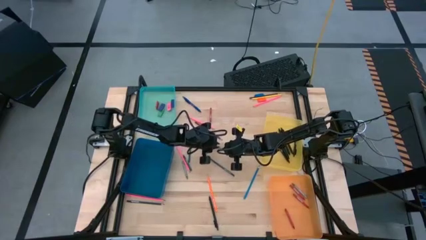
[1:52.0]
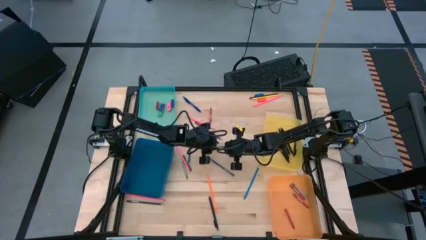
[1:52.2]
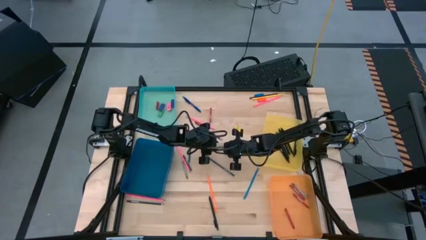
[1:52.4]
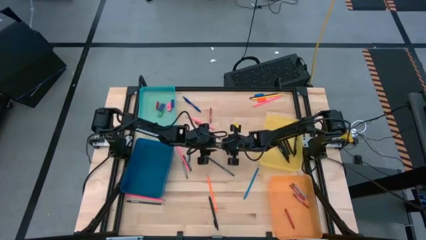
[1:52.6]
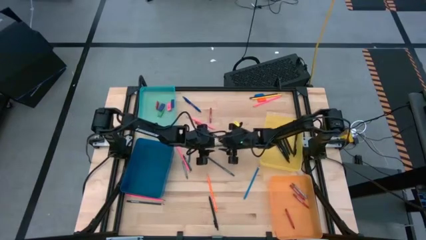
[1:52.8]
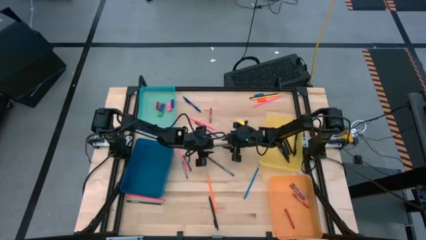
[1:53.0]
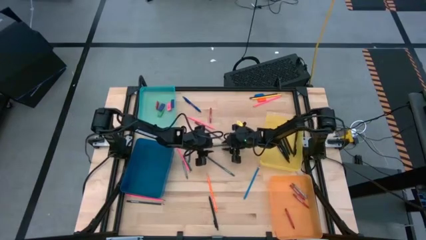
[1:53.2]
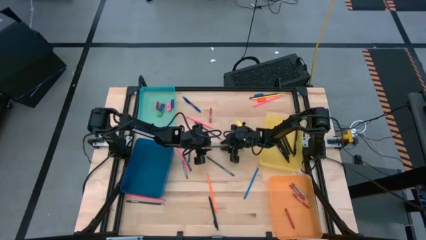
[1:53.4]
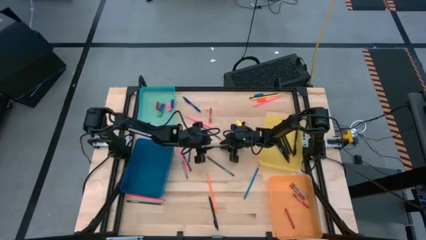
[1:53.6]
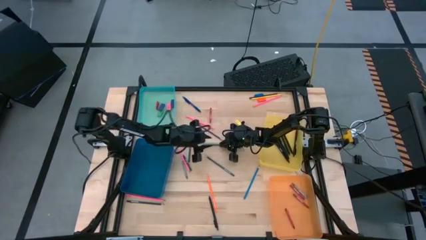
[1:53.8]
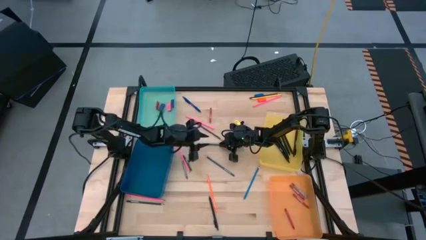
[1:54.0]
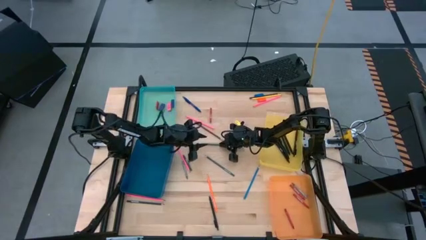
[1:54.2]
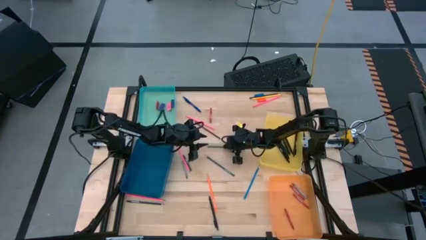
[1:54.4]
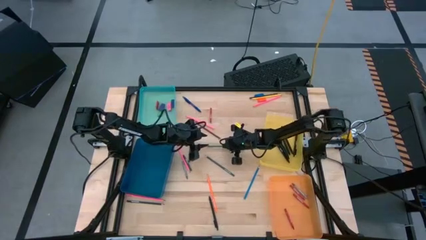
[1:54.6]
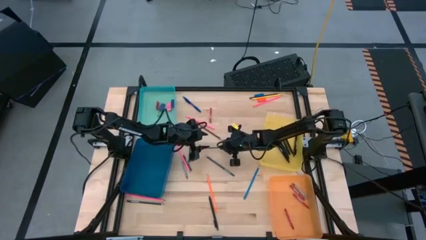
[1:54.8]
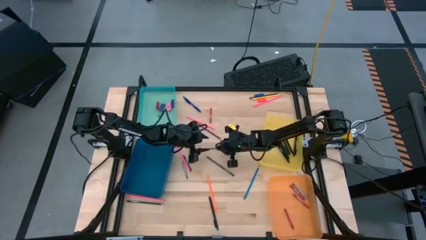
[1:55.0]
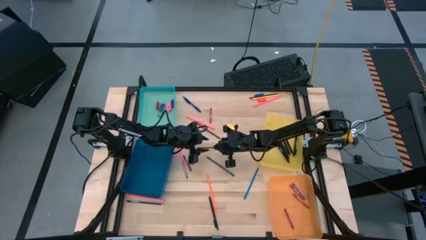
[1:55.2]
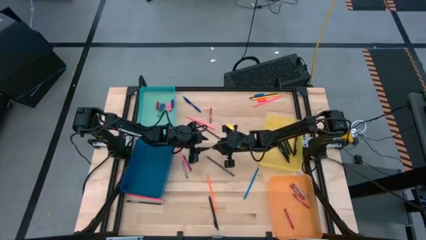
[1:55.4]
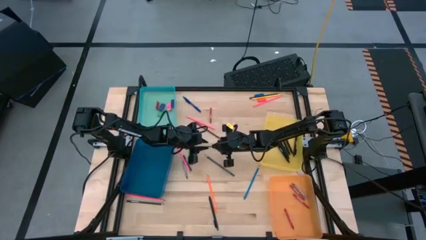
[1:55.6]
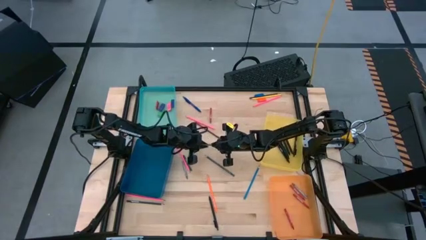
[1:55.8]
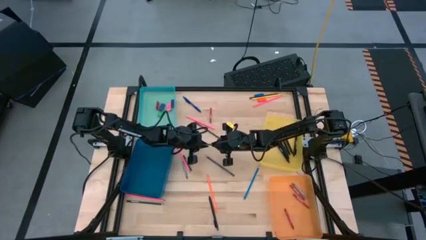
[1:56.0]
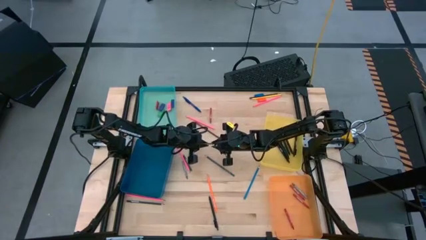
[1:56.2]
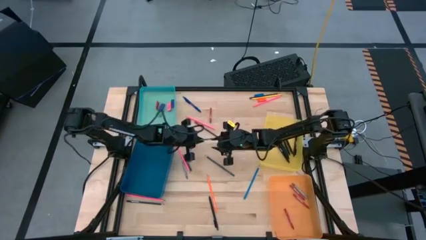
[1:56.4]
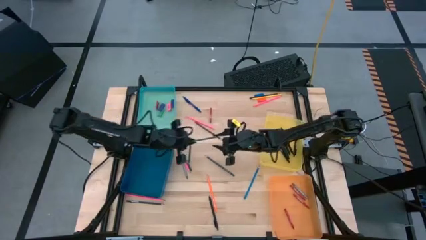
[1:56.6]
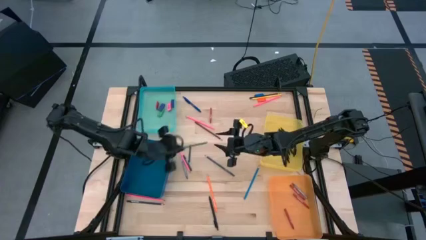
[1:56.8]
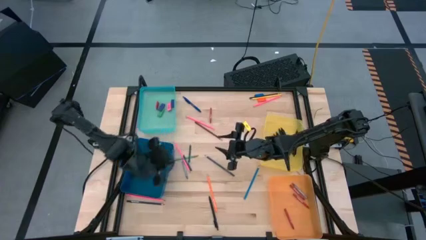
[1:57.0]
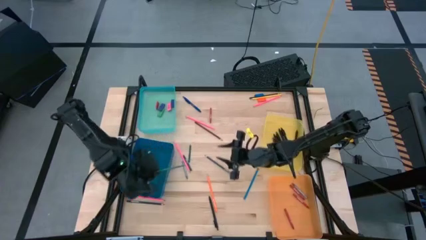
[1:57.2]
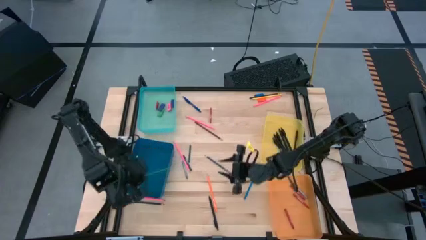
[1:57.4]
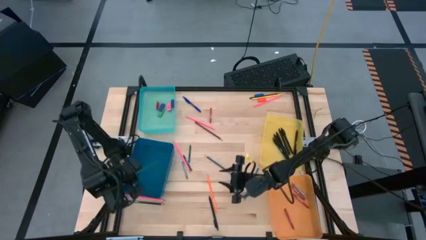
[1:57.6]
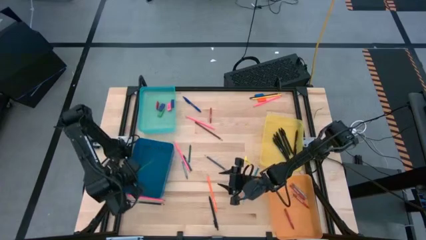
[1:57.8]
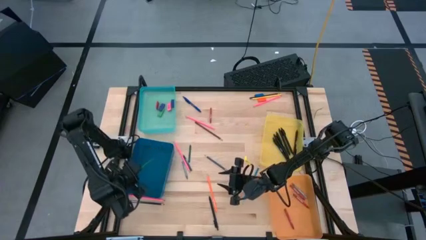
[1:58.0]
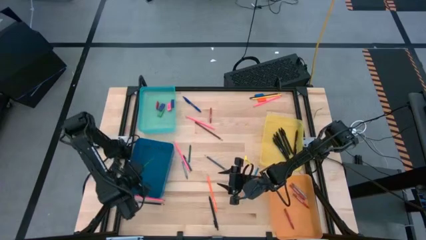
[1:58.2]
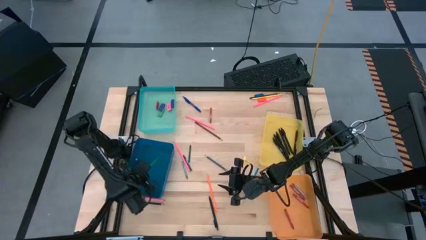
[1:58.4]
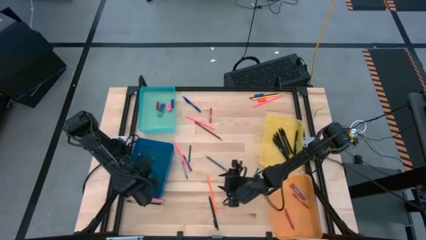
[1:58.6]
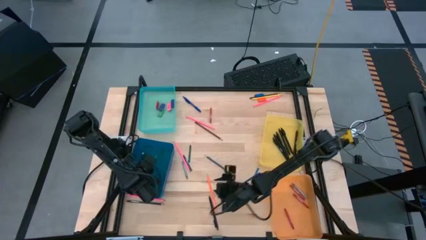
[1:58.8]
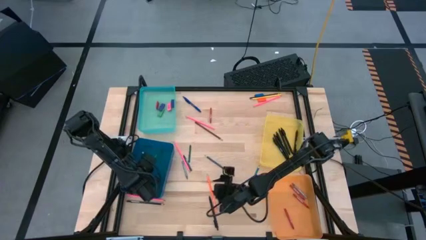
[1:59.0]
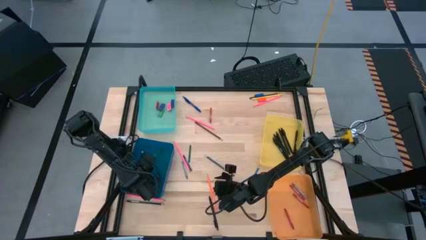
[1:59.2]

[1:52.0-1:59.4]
Task: Sort crayons/erasers/pens/pencils in bins
Put the green colored pencil into the blue bin

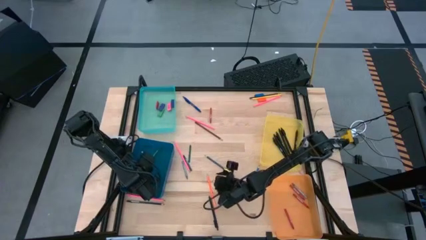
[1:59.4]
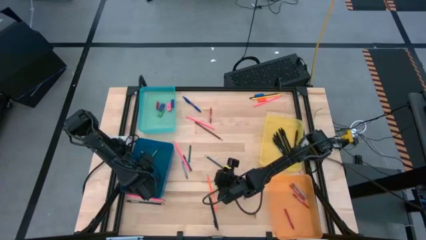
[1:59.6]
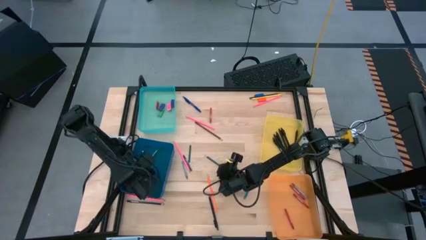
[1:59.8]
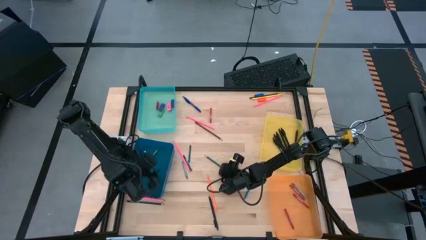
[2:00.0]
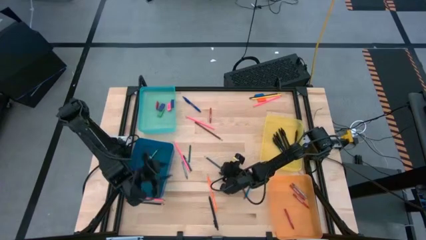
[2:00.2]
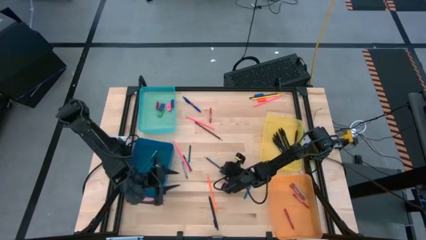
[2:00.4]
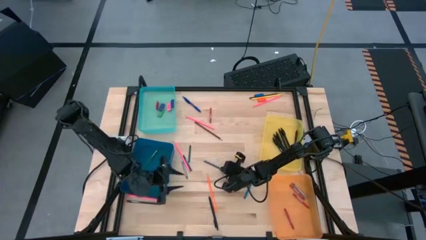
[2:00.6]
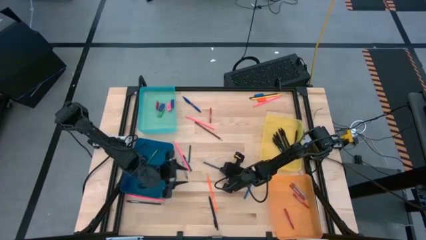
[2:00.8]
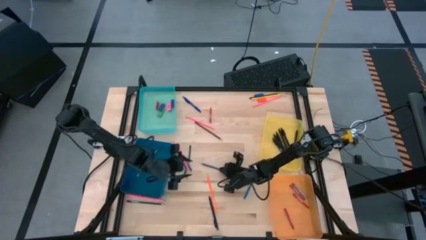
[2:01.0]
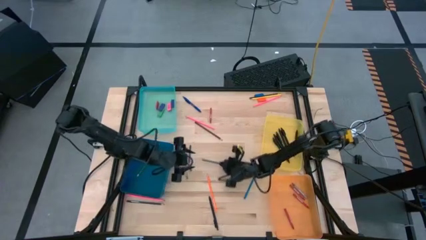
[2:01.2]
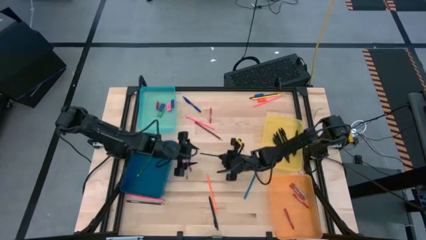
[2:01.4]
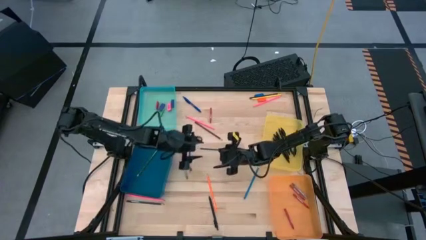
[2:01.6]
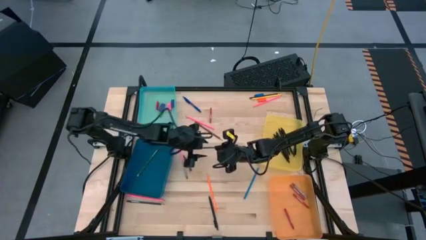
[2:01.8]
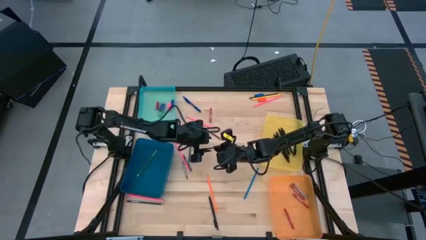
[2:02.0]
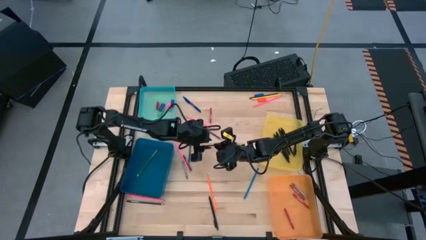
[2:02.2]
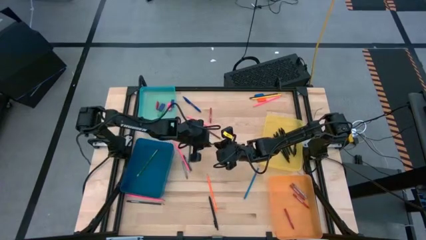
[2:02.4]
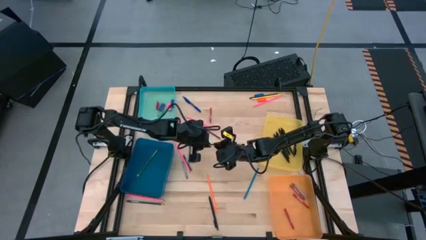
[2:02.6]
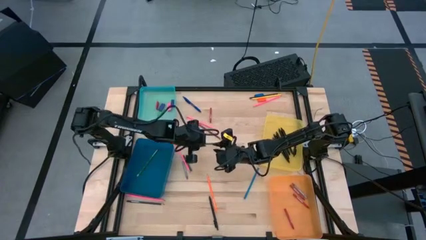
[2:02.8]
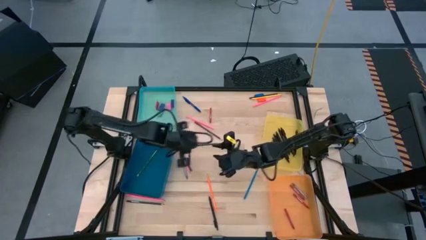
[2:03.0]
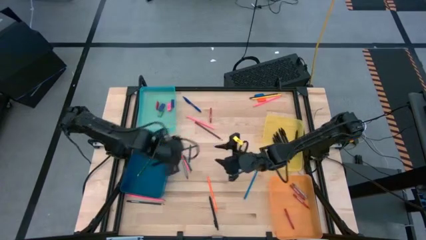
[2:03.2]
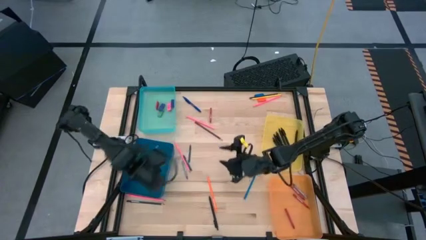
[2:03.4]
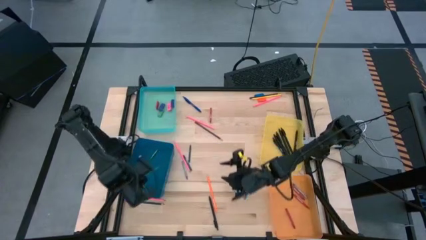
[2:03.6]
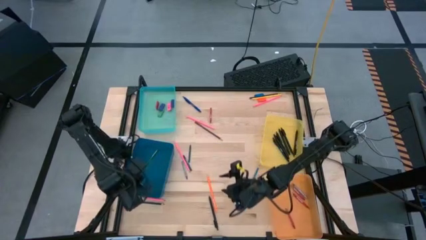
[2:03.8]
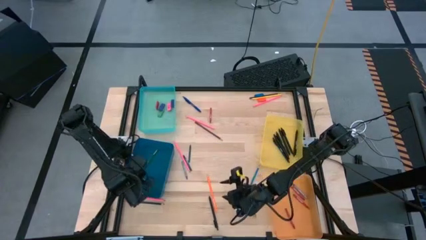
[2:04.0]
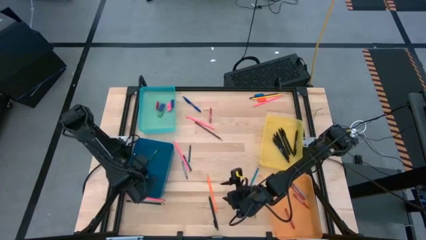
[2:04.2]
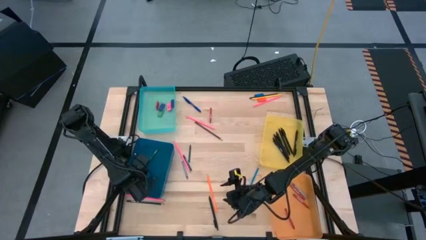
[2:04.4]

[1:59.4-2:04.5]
Put the dark green colored pencil into the blue bin

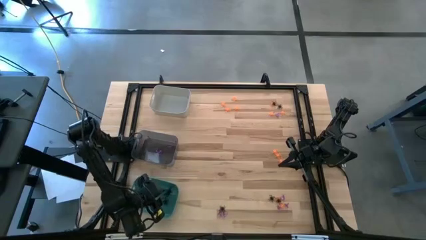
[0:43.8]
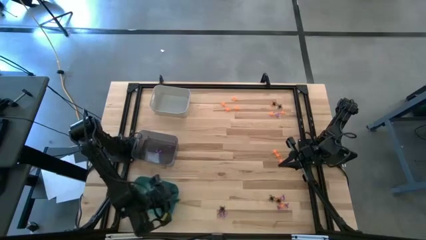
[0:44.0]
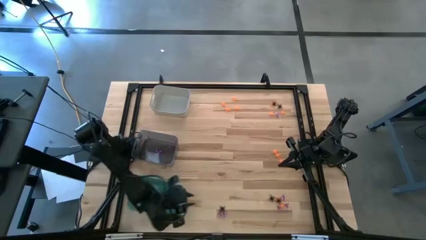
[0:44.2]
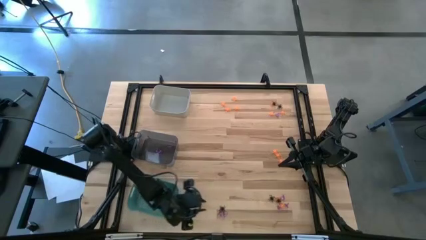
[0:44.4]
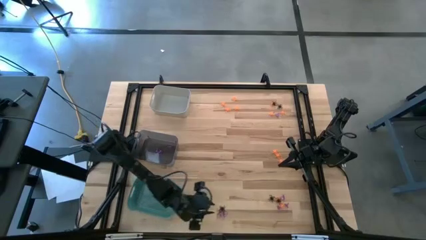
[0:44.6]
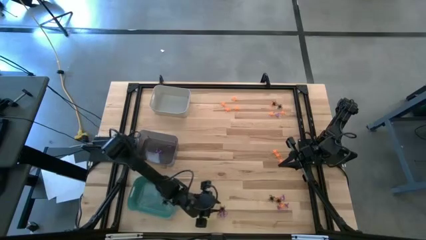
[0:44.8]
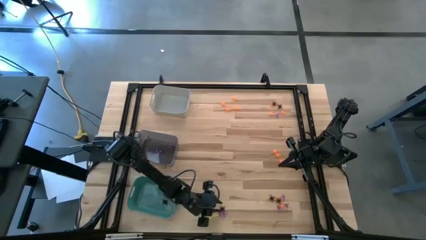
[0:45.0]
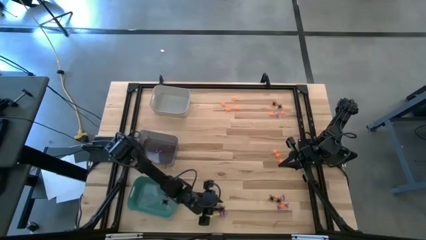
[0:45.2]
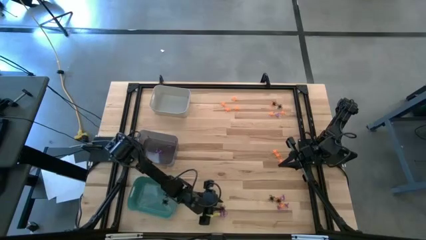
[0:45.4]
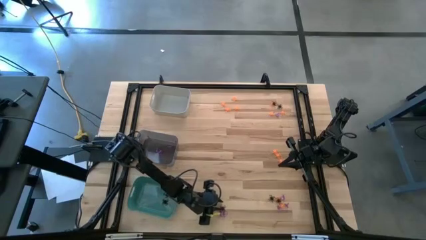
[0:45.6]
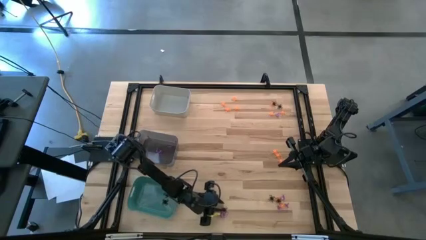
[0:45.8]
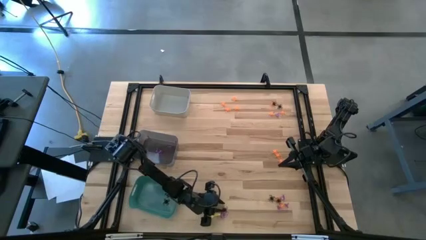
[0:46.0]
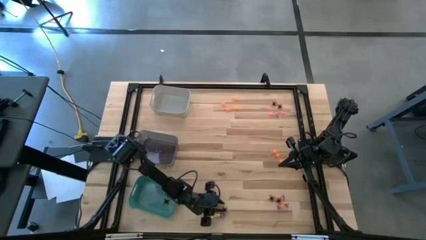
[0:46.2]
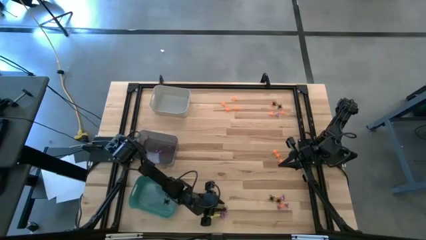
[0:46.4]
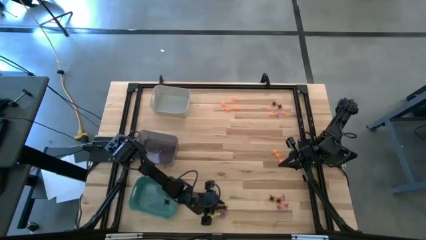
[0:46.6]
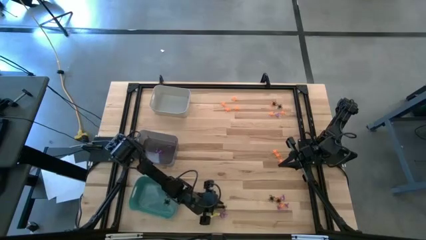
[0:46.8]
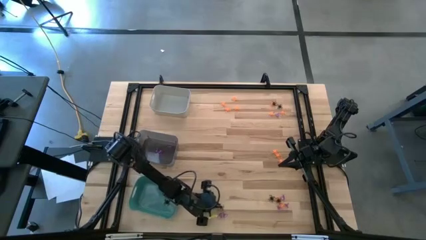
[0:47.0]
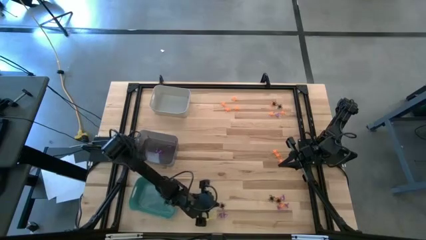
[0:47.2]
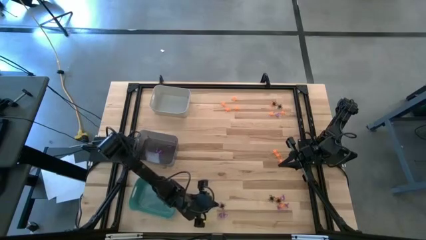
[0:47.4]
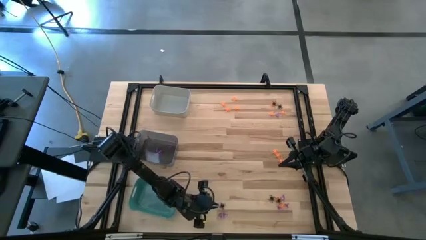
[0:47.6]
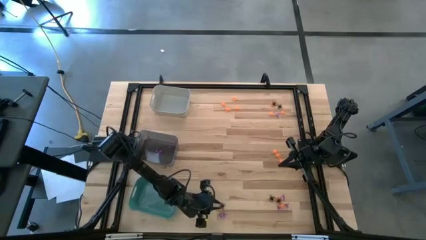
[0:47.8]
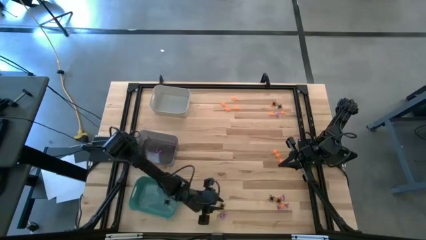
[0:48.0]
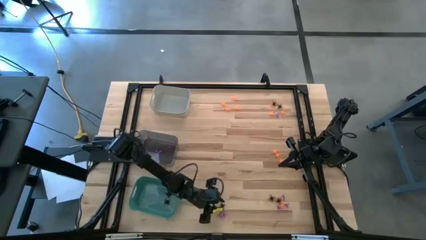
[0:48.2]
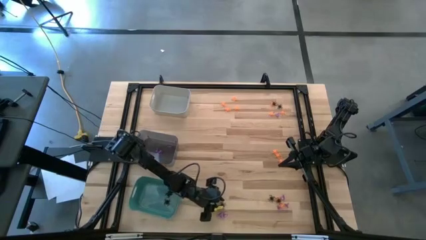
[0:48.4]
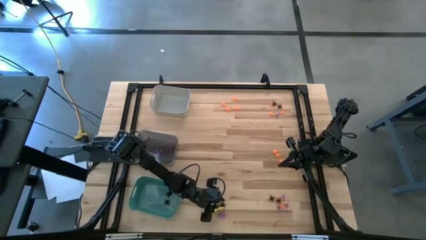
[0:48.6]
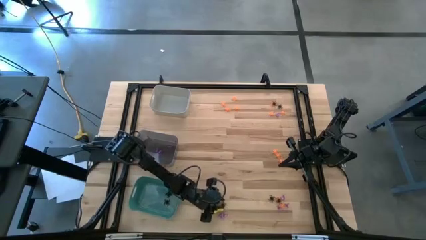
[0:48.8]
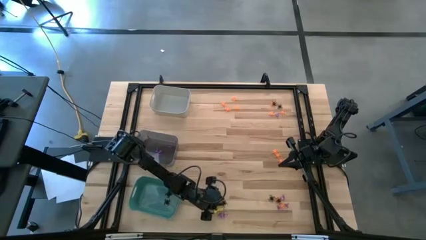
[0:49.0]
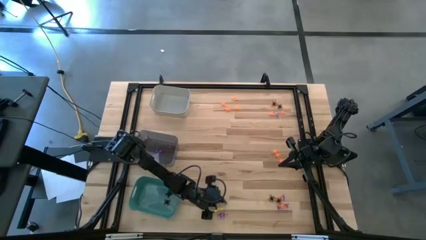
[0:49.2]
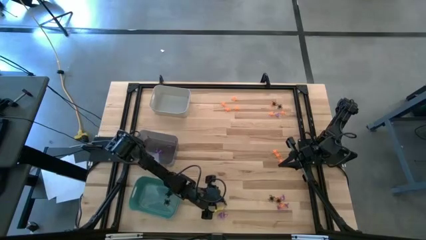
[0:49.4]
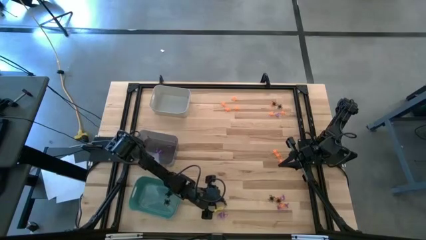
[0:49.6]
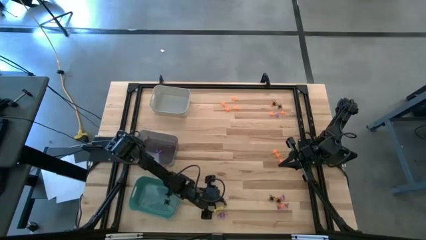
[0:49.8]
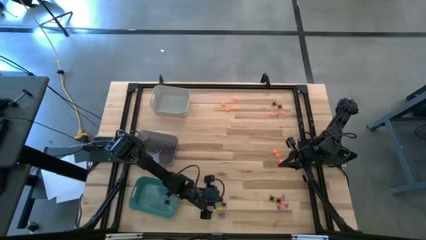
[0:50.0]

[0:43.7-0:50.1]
Task: Sort Halloween decoration
Put the bottom center black spider into the green bin
